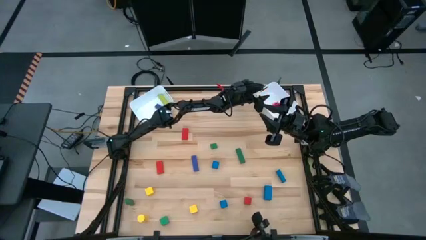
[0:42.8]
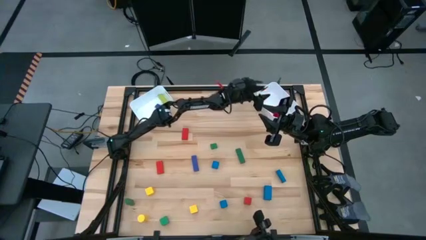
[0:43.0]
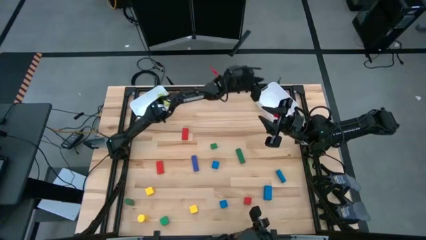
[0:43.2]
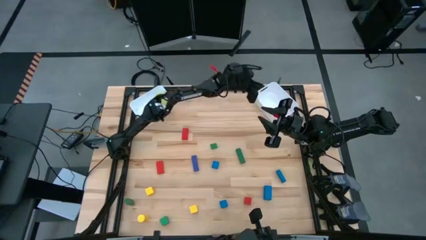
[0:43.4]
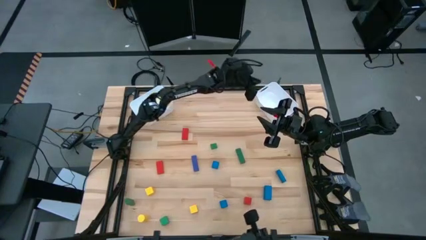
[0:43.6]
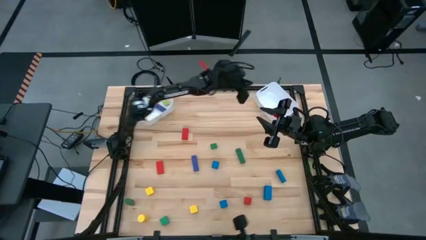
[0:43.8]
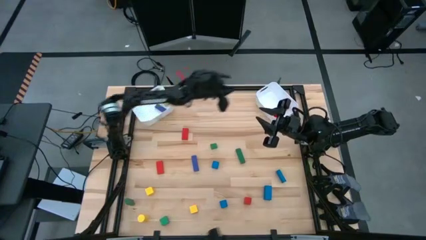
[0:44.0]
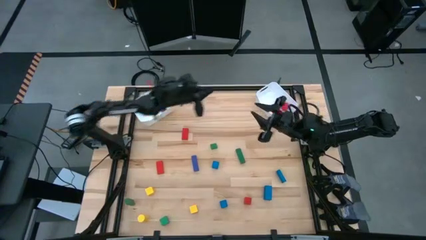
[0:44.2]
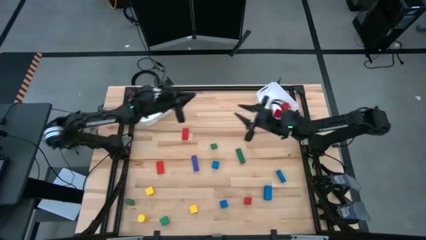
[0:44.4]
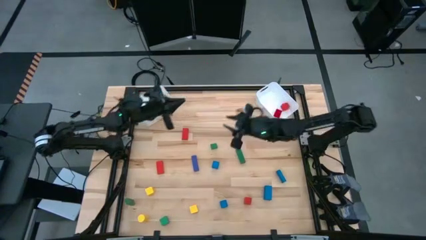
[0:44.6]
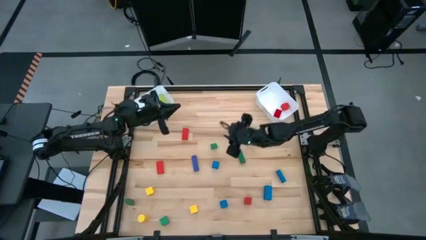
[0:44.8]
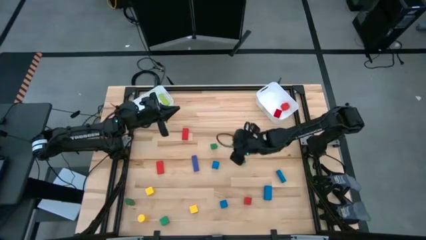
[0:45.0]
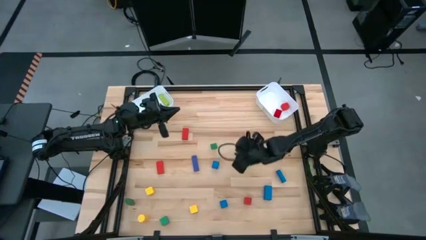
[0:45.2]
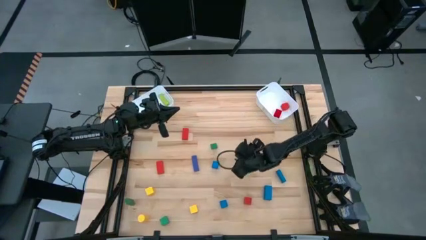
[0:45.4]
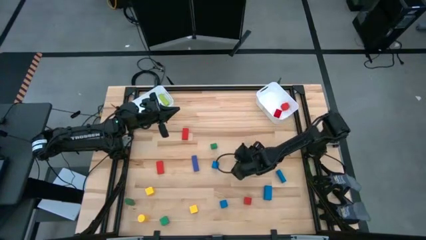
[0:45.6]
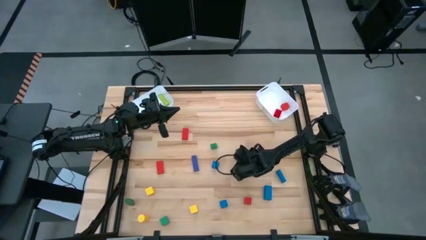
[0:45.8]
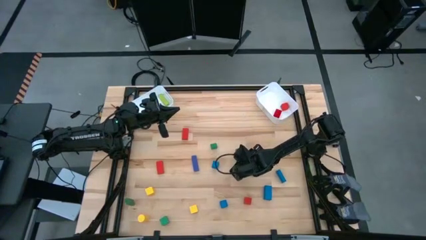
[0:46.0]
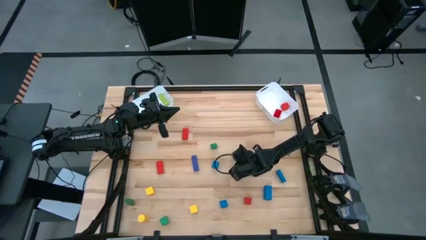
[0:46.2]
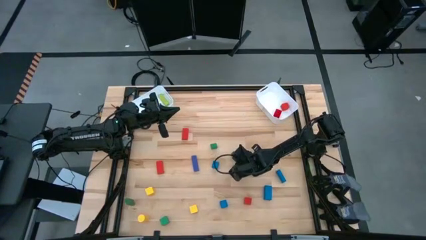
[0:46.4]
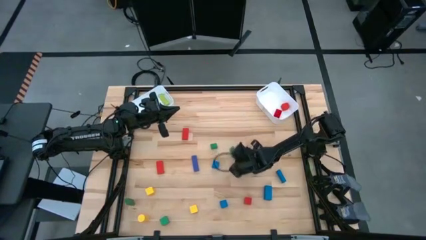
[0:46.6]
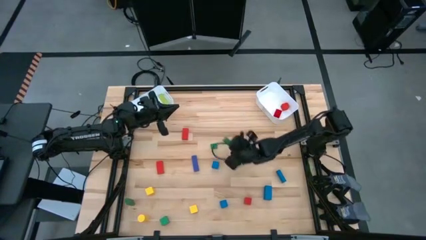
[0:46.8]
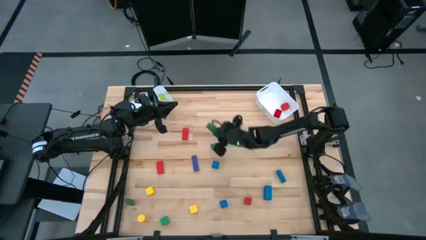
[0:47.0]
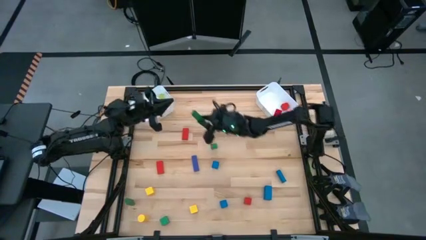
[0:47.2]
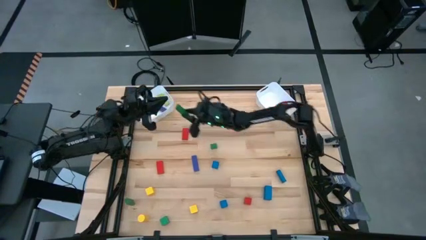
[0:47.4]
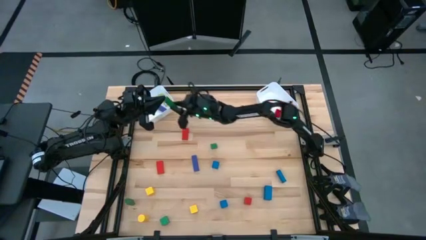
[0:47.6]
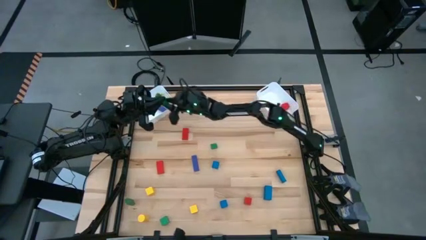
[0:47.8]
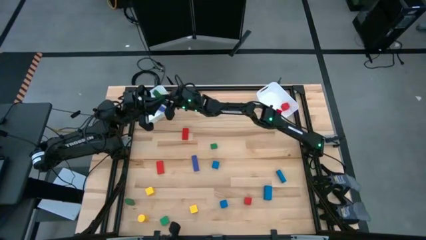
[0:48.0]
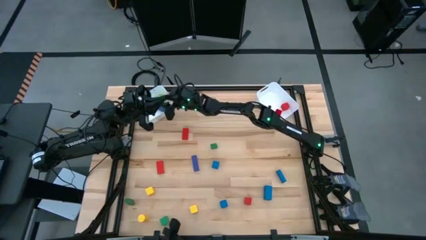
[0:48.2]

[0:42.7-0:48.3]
Task: Sort blocks by size
Put the large green block into the left white bin

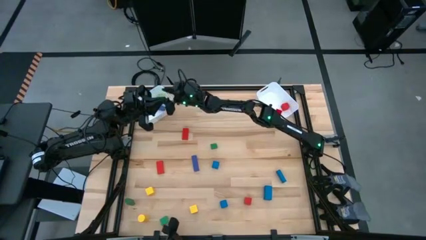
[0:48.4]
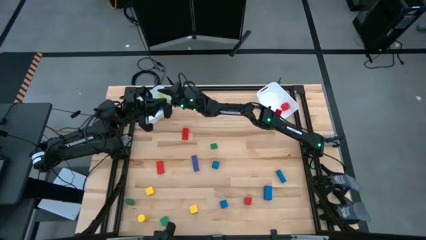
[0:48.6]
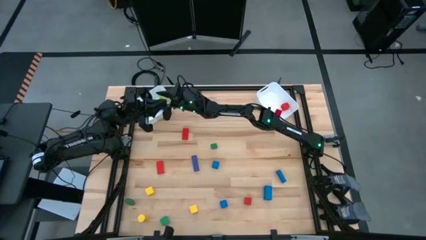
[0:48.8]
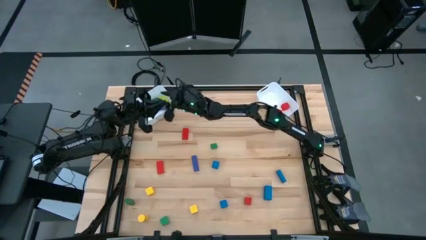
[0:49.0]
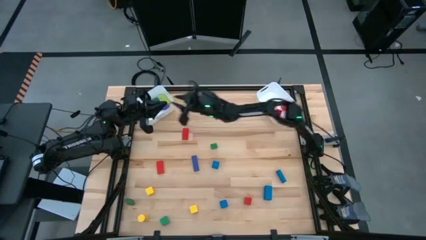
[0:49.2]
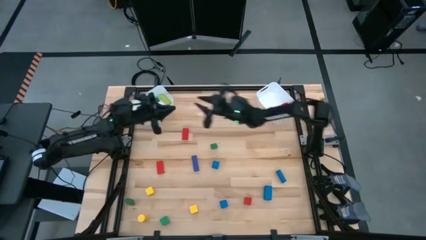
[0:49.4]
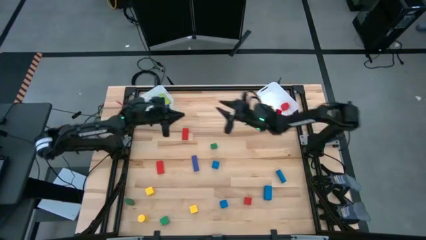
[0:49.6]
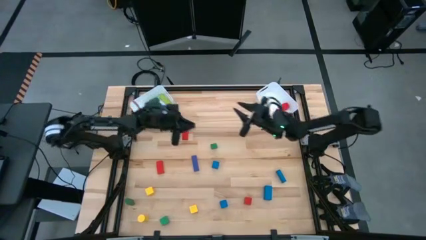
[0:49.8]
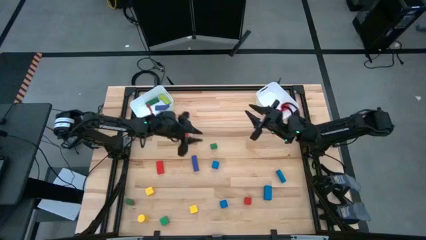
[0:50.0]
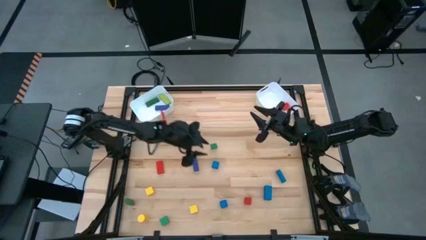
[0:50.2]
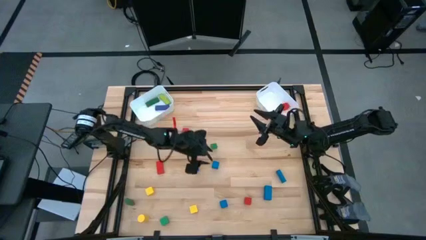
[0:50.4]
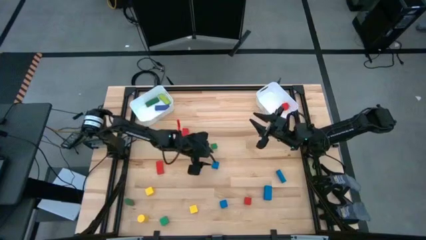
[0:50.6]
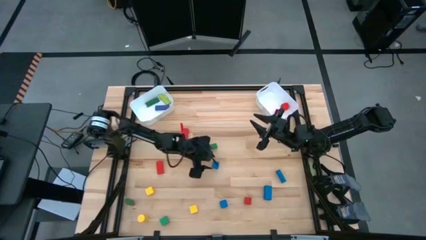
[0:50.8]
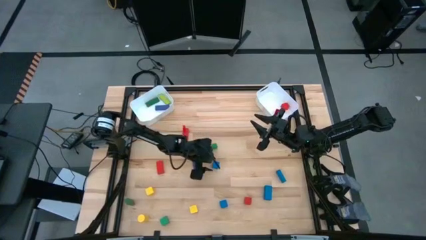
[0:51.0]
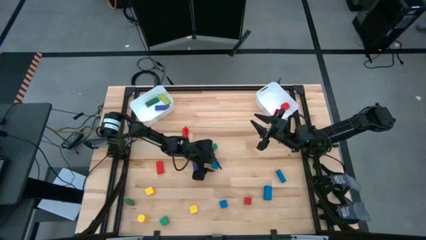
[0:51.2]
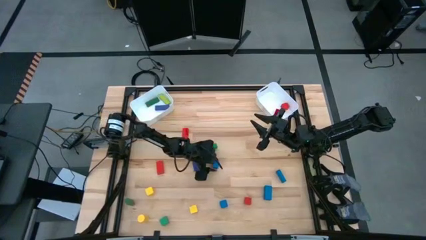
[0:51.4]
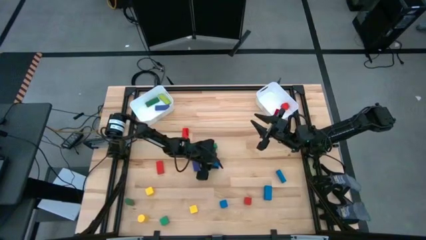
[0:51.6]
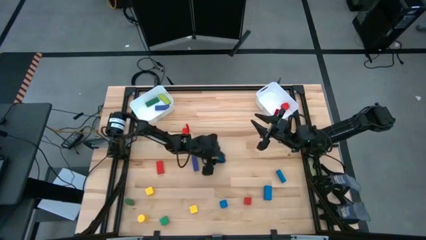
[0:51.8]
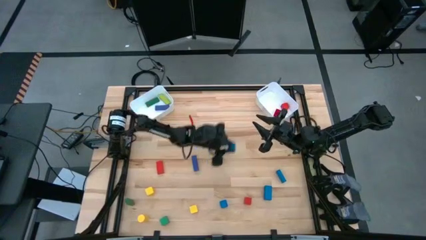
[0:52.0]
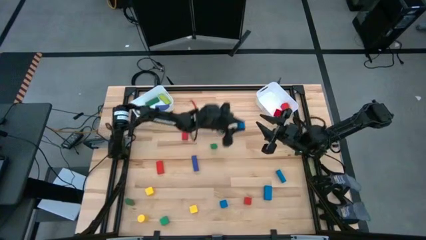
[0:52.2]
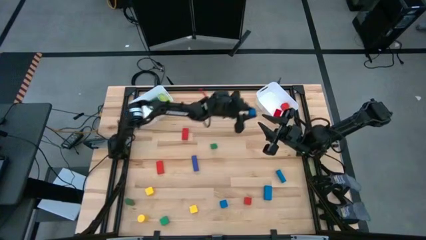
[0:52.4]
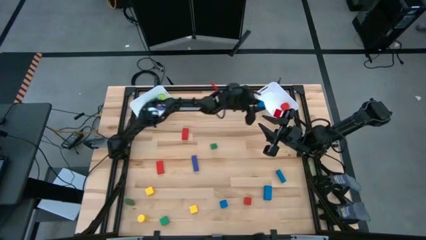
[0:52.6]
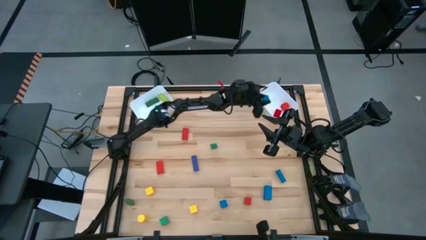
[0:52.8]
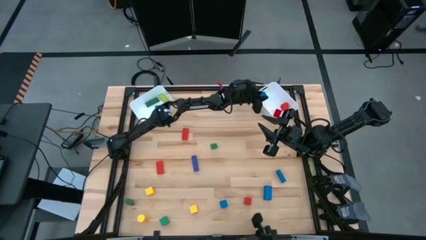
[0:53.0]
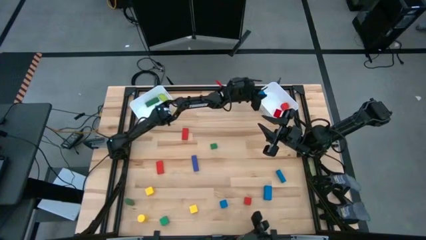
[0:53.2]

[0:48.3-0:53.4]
Put the small blue block into the right white bin

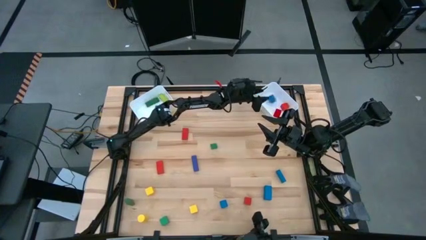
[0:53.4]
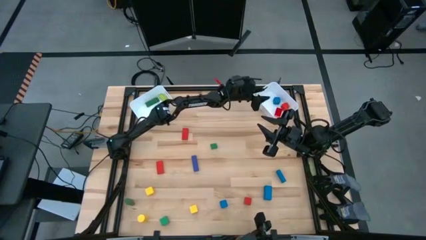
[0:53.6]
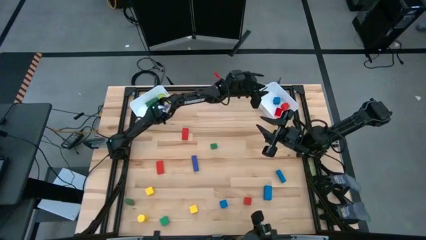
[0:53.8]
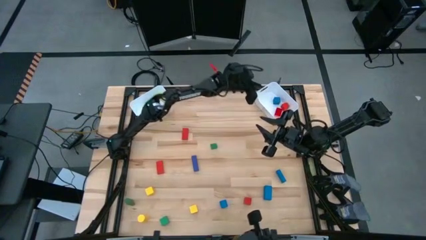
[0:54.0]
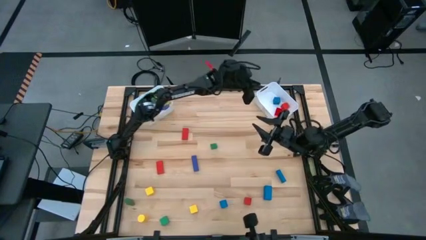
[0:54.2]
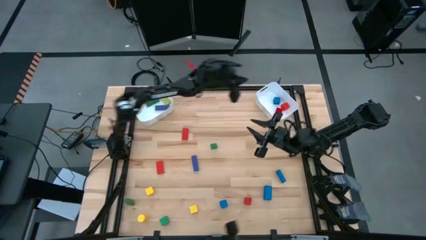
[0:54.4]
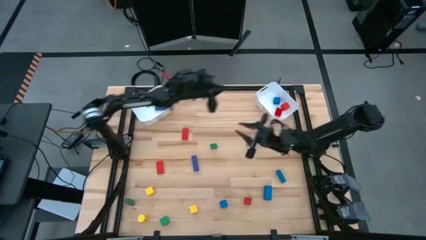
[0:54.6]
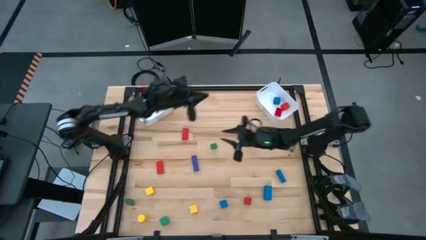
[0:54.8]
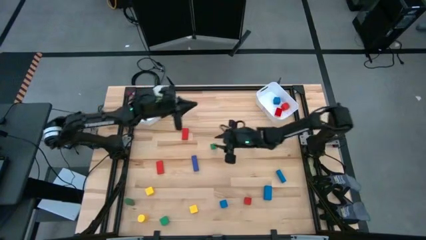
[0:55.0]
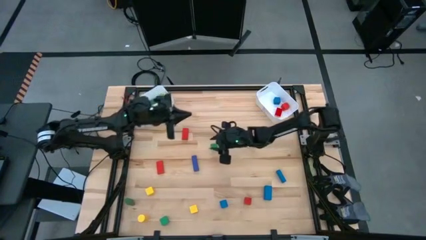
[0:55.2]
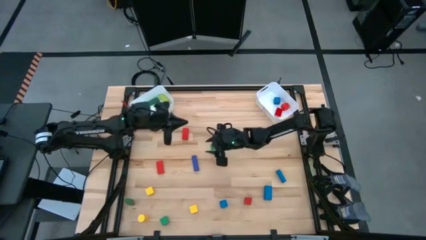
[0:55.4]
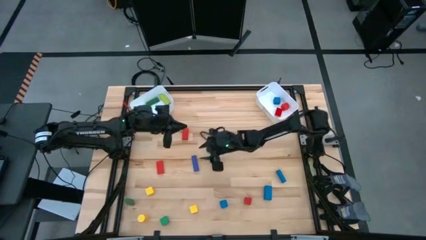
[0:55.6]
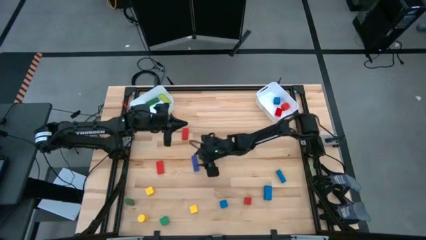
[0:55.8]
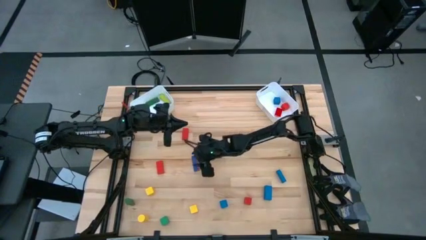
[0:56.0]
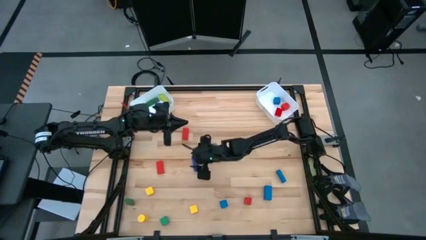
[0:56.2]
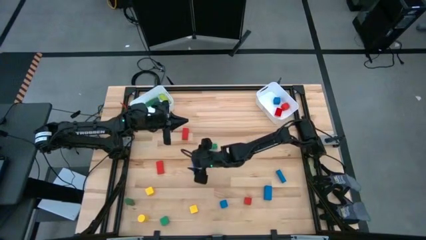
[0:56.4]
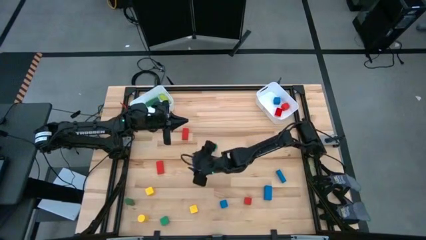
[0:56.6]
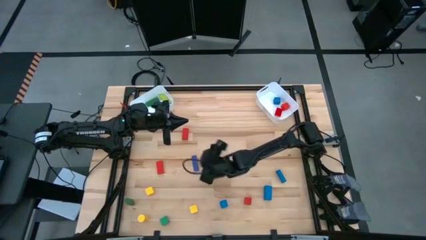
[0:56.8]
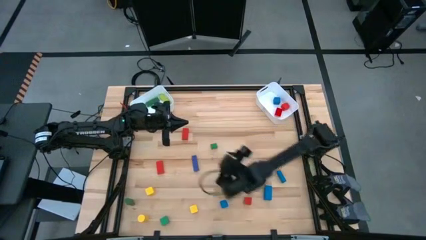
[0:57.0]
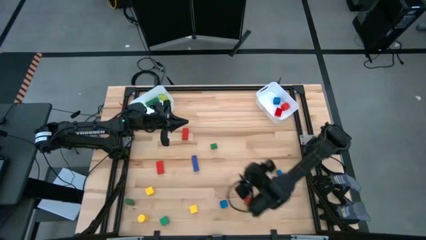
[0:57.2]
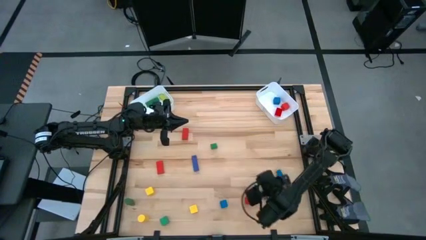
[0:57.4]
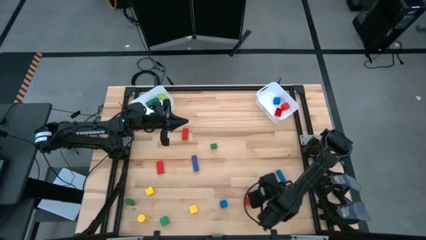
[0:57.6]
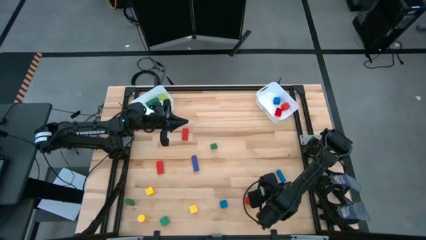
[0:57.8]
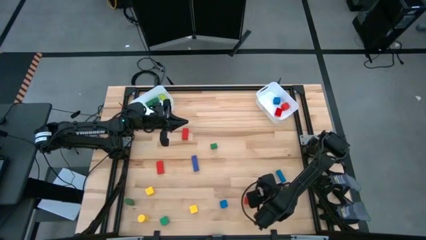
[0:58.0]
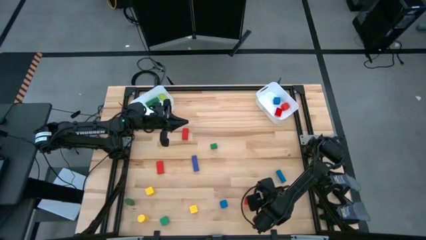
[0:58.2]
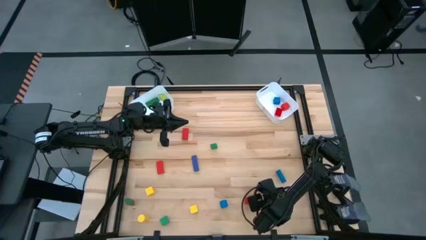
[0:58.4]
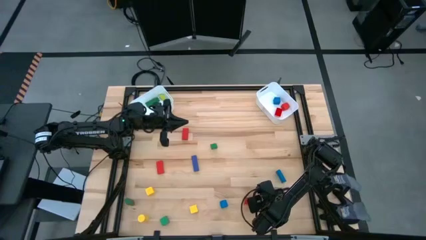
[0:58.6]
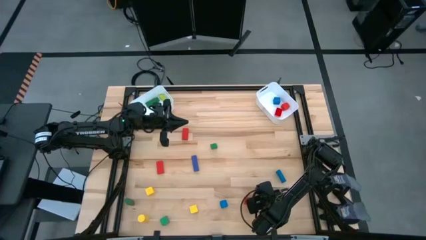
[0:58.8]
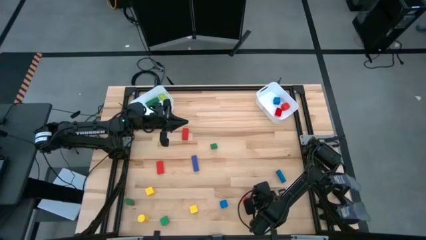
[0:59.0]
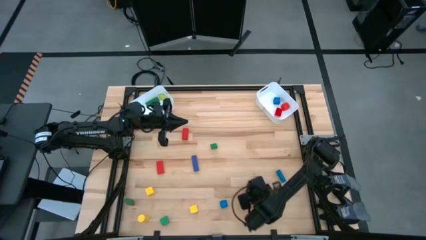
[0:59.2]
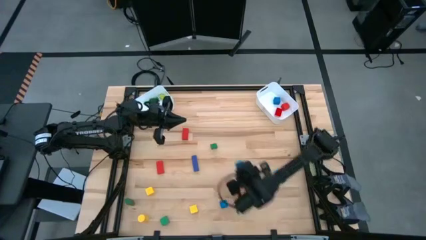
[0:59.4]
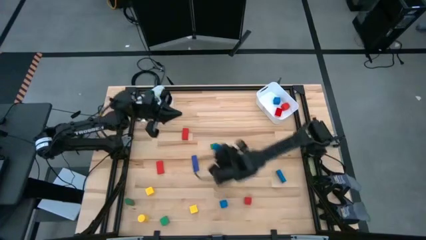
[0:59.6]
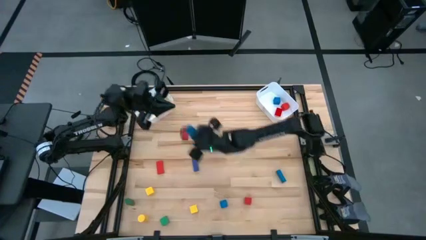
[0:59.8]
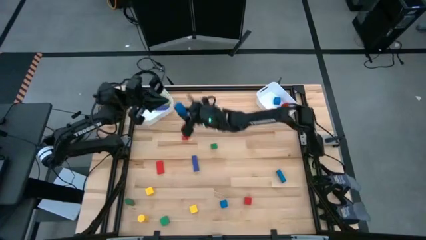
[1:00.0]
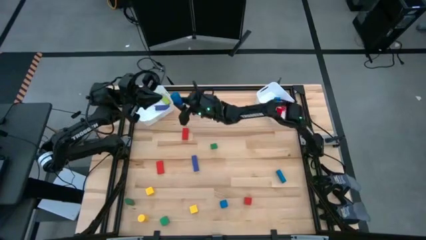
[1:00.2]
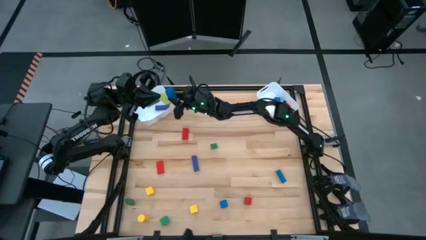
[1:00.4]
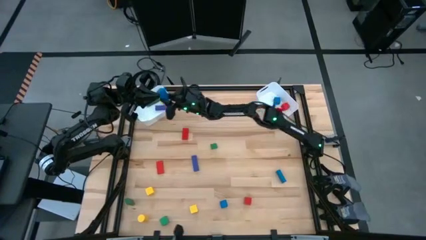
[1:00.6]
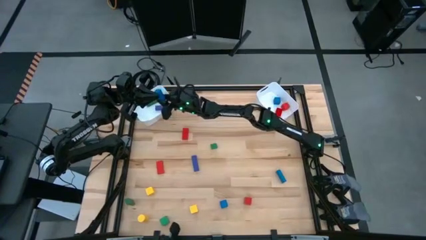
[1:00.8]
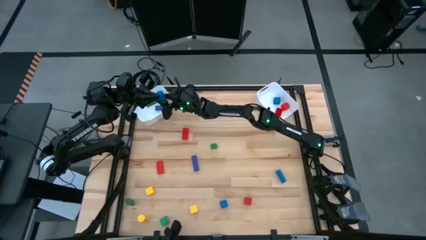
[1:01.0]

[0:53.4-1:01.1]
Put the large blue block into the left white bin
